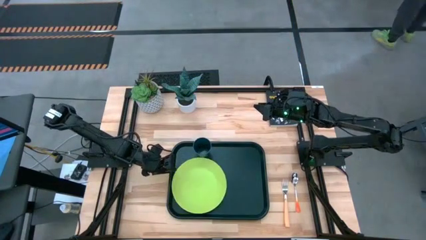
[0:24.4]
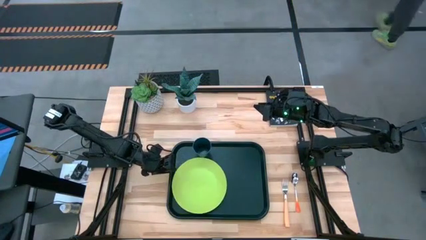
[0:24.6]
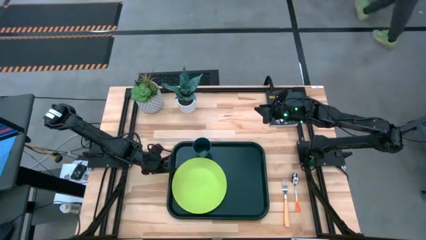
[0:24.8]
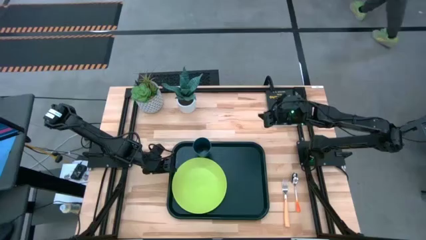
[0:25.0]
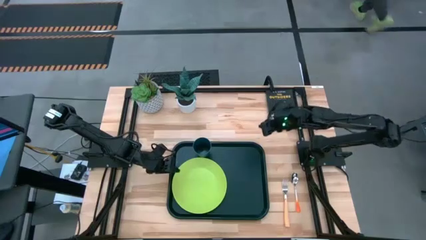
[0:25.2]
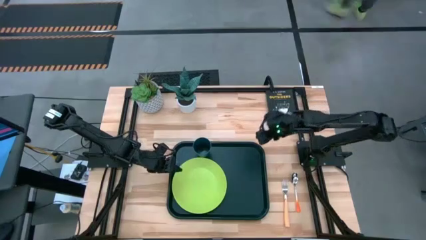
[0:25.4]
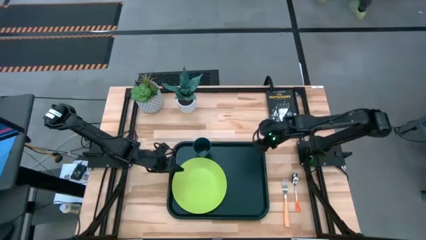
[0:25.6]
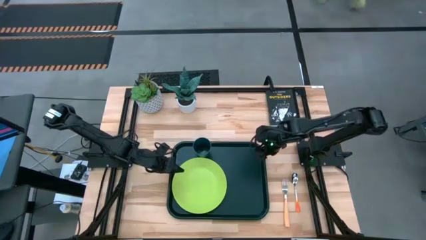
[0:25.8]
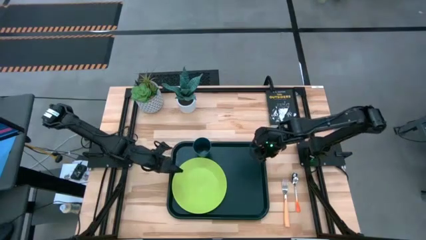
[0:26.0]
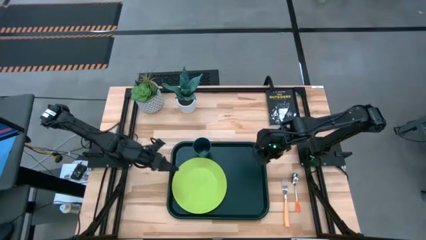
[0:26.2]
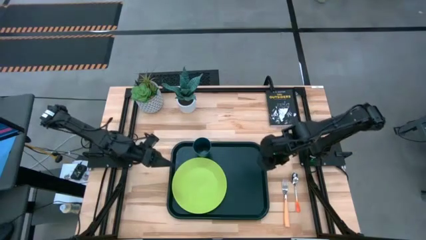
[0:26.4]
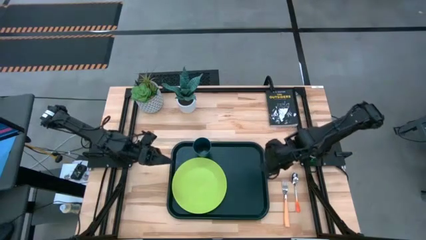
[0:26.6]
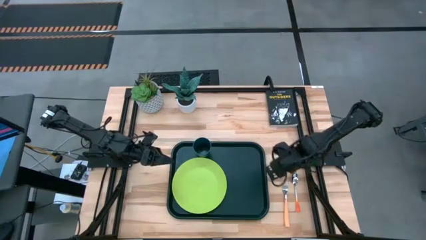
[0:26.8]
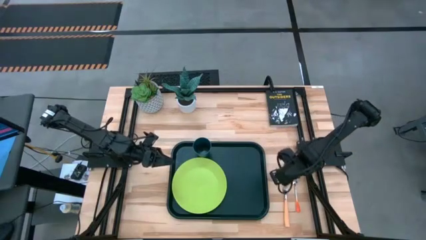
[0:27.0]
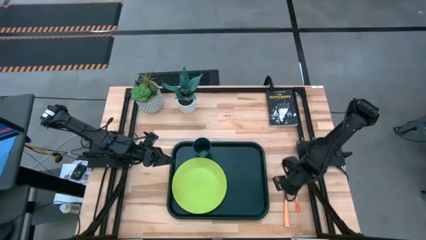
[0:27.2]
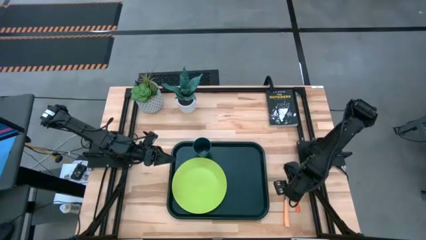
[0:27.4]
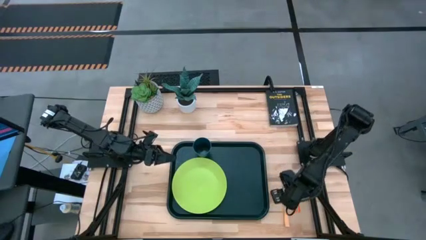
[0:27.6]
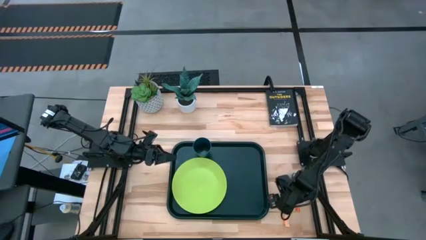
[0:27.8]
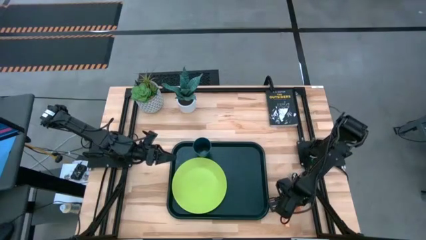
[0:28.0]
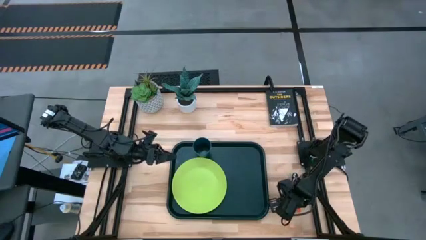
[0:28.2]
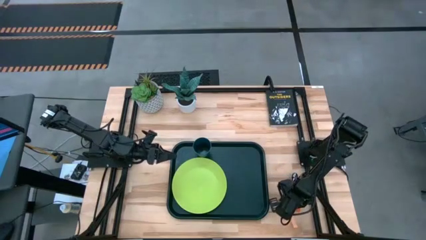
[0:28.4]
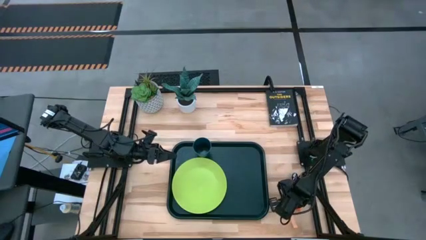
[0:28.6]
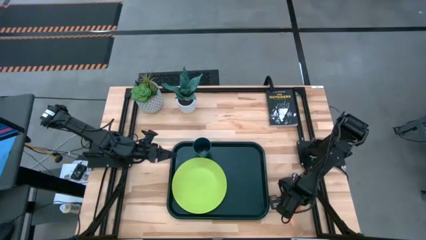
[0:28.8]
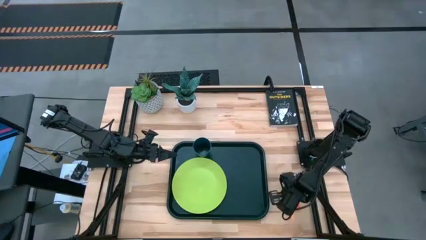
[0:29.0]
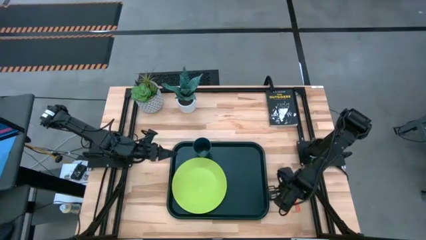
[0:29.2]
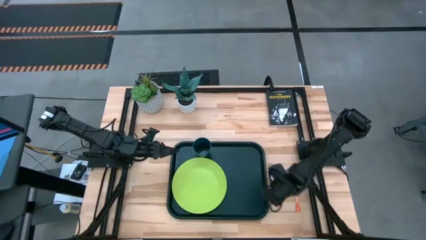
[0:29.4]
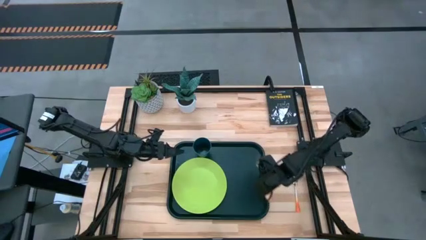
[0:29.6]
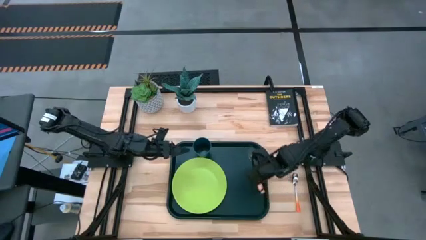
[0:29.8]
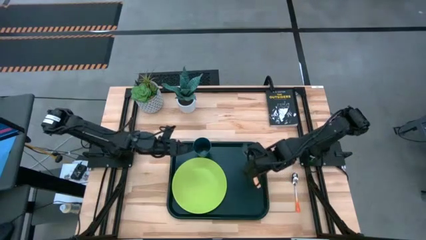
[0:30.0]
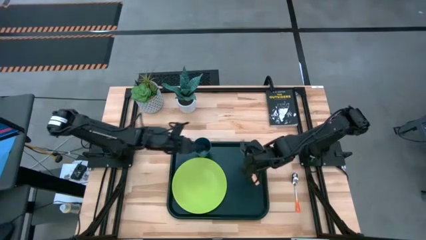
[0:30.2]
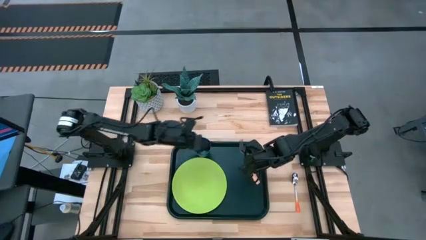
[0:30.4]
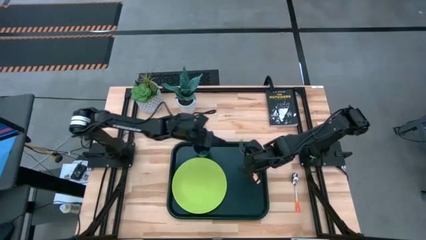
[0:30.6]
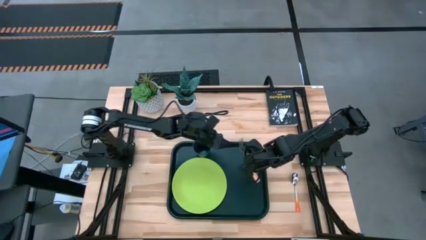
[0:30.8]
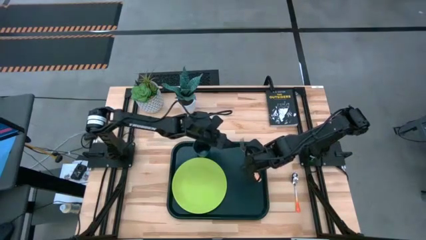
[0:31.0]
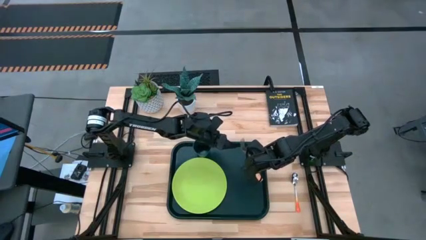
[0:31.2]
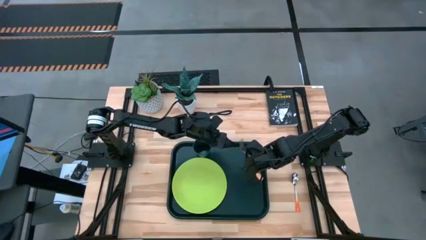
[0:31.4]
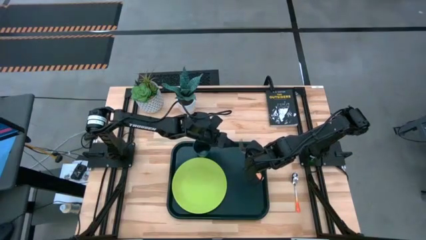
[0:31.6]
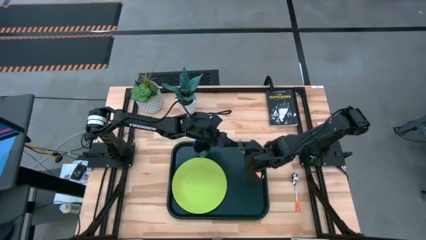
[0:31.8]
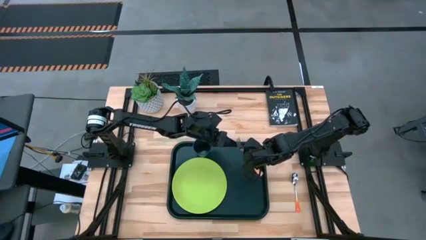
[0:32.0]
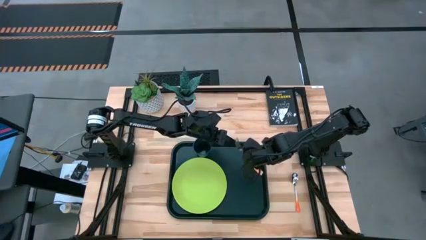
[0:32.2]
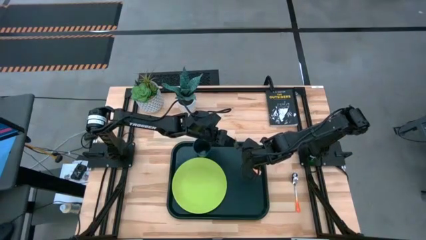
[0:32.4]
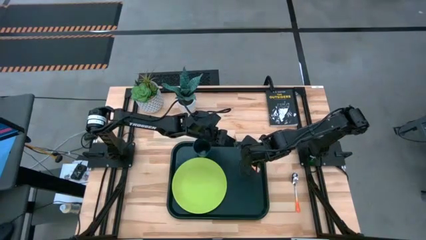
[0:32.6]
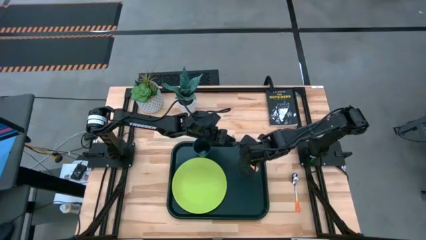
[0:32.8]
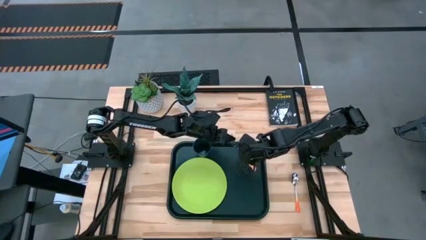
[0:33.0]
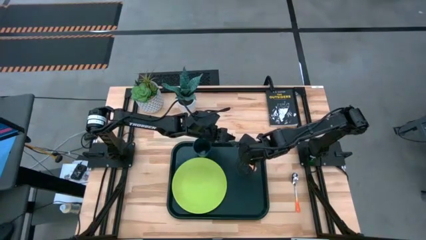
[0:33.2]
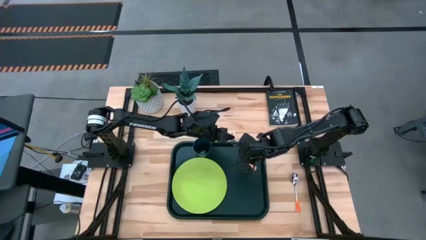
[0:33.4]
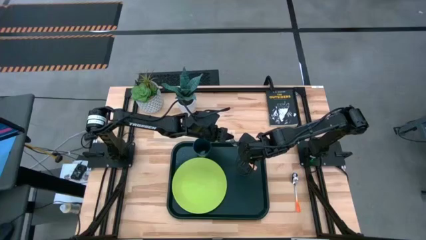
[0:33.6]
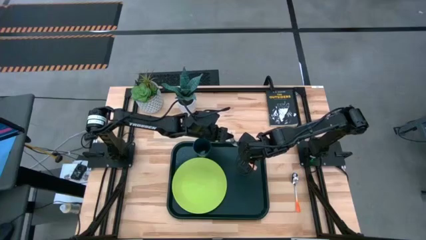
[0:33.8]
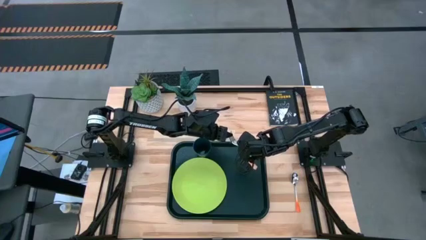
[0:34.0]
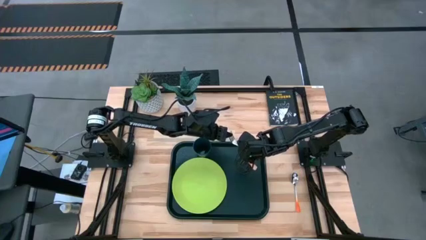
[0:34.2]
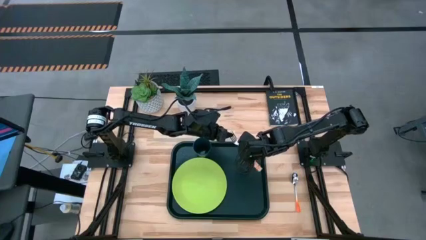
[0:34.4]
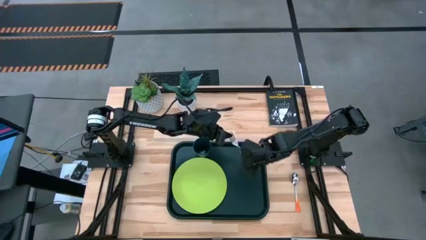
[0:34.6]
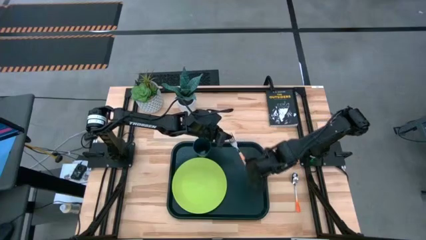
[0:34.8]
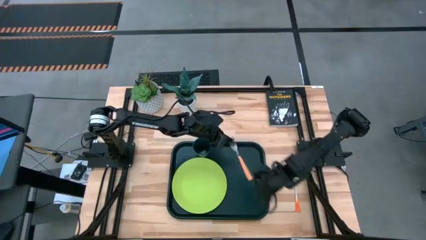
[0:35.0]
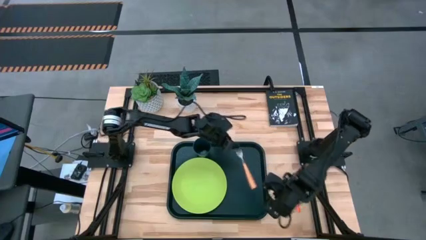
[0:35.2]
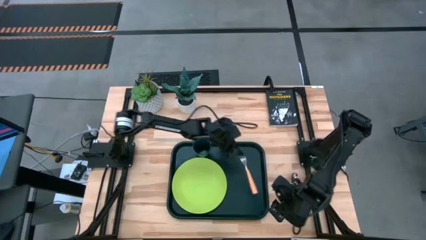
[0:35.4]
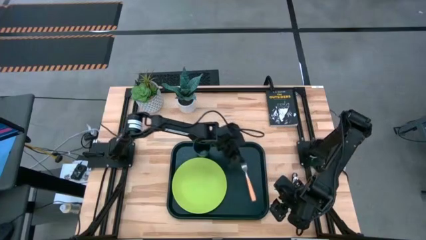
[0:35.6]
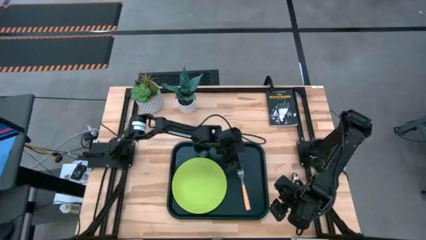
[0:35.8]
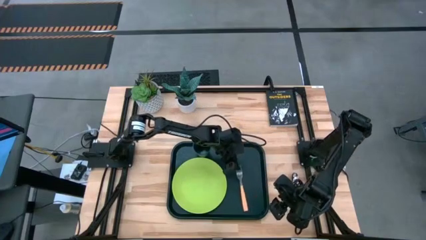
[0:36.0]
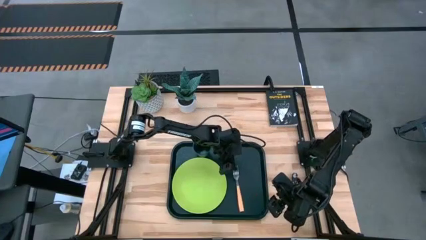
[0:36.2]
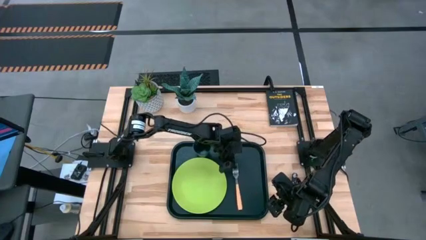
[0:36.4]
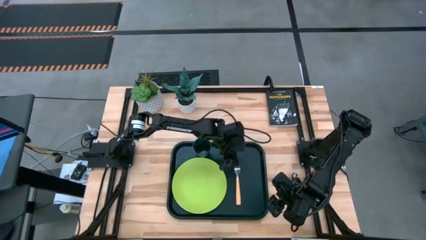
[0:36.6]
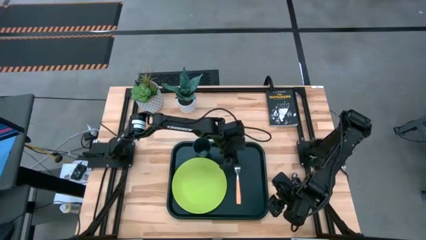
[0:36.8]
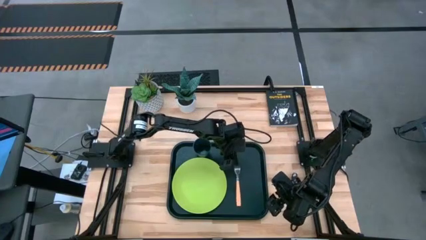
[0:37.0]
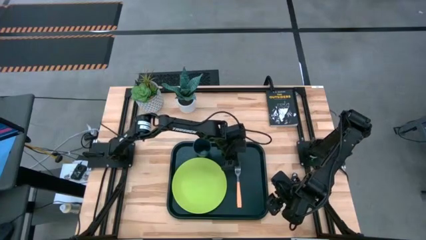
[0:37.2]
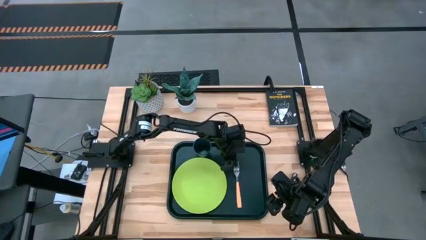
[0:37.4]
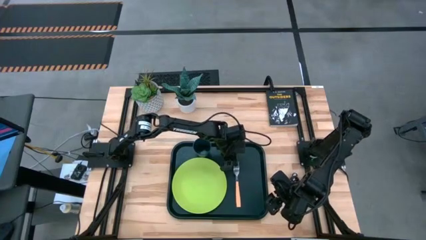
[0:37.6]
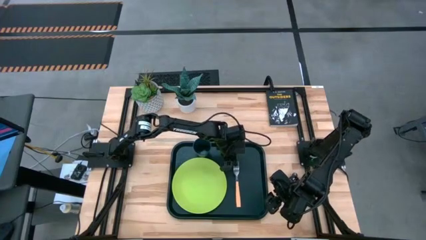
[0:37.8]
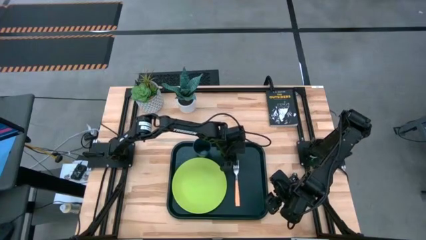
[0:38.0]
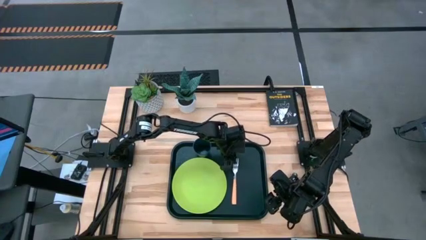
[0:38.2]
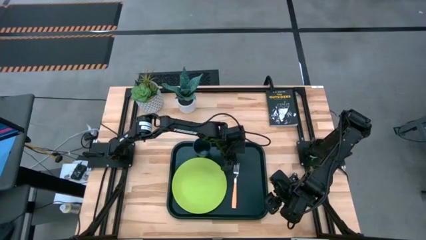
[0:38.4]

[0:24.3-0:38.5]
Task: Pick and place plate/cup/fork/spoon on tray
Put the orange fork on the black serving tray to the right of the green plate
